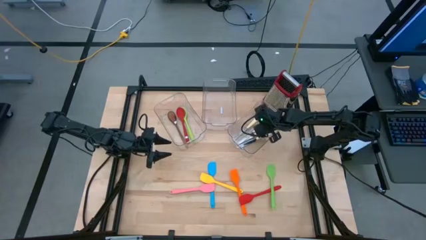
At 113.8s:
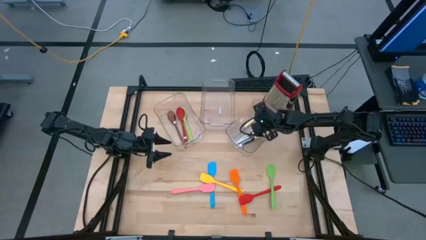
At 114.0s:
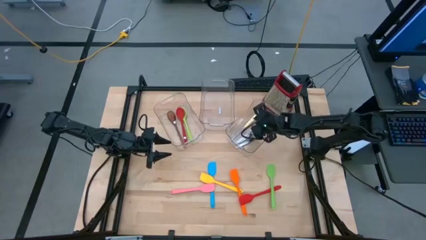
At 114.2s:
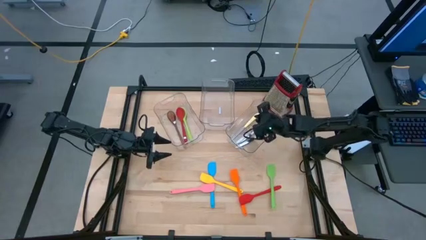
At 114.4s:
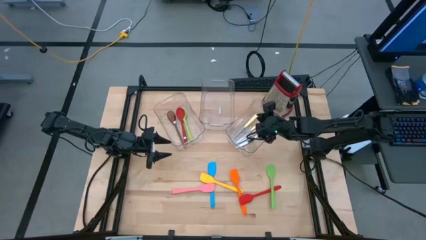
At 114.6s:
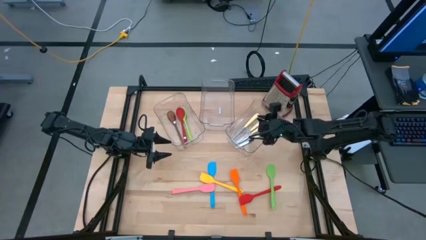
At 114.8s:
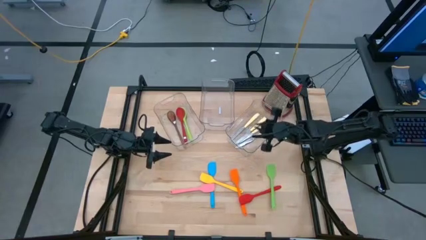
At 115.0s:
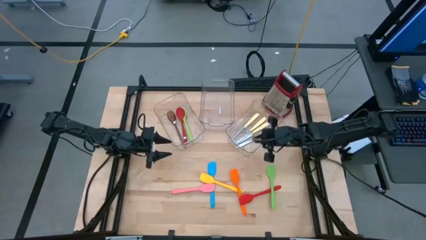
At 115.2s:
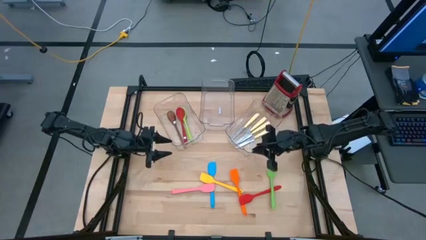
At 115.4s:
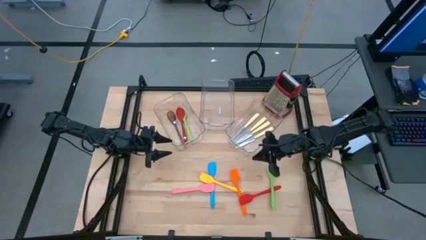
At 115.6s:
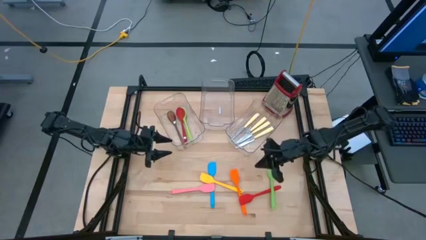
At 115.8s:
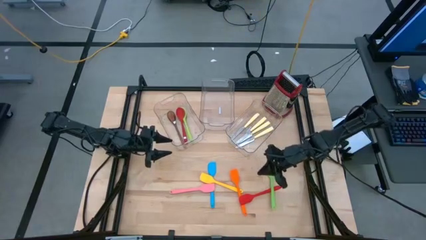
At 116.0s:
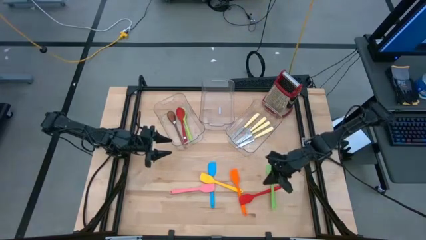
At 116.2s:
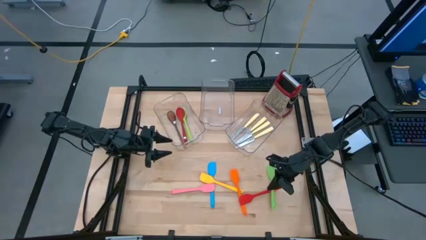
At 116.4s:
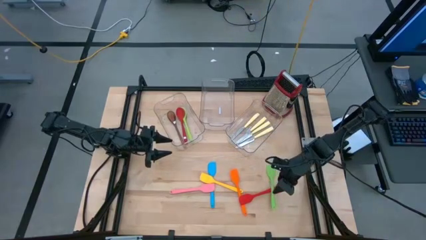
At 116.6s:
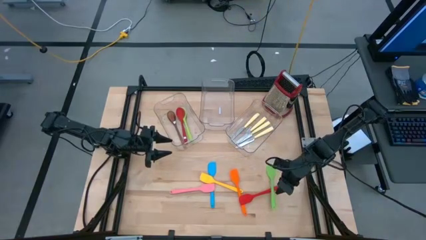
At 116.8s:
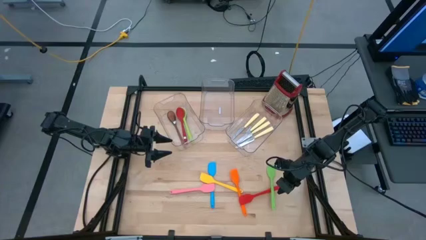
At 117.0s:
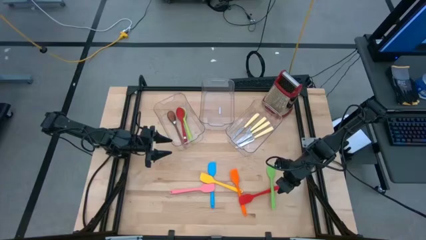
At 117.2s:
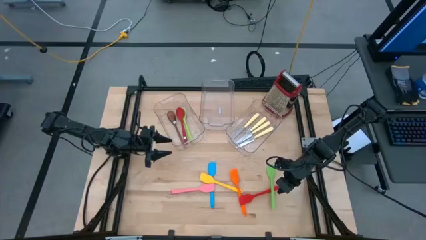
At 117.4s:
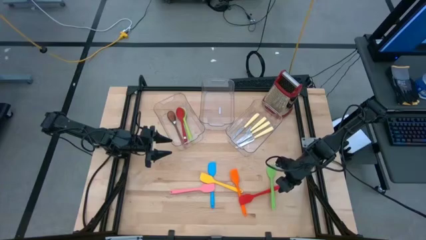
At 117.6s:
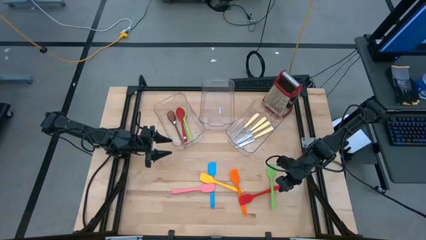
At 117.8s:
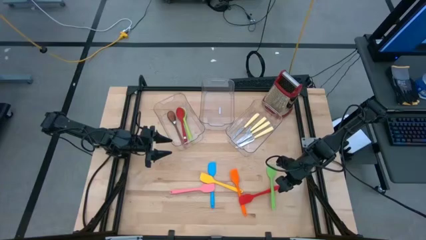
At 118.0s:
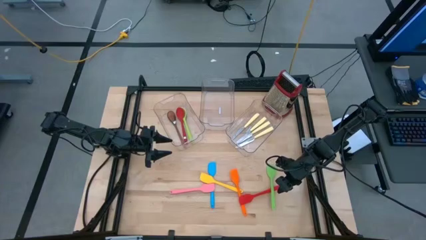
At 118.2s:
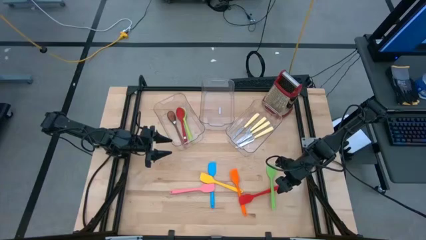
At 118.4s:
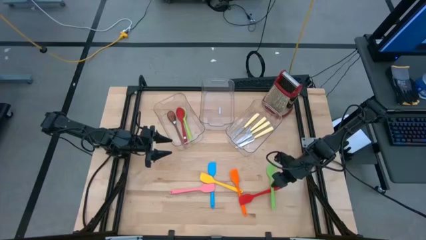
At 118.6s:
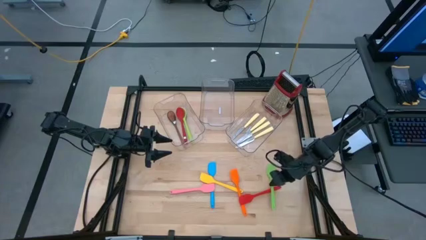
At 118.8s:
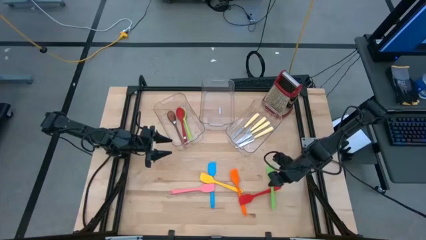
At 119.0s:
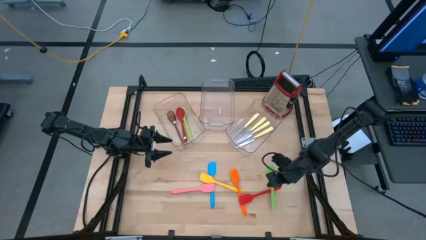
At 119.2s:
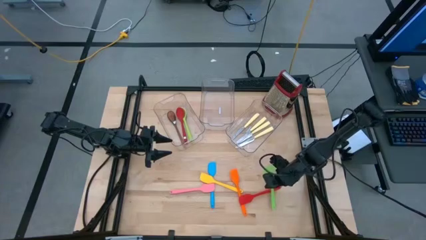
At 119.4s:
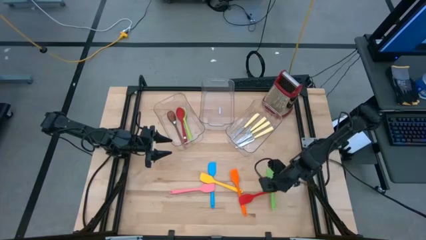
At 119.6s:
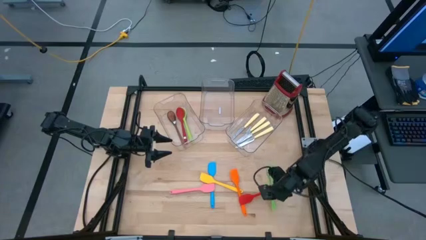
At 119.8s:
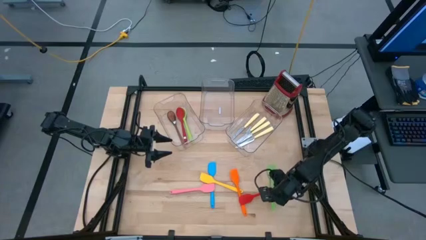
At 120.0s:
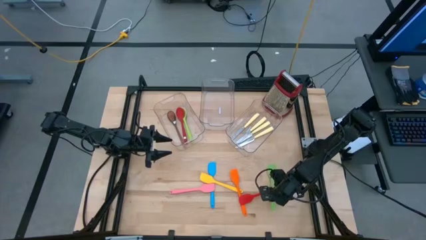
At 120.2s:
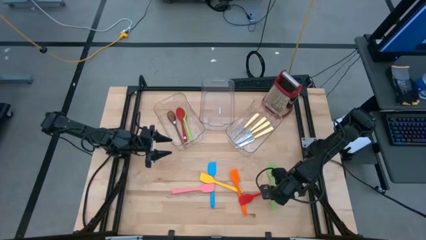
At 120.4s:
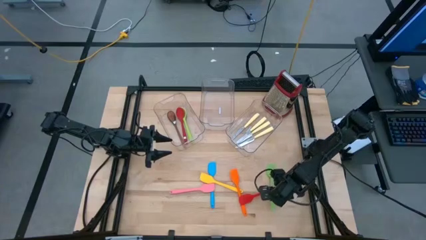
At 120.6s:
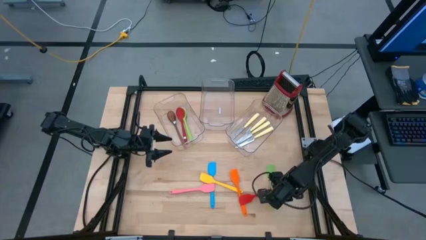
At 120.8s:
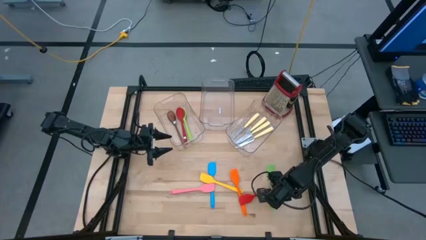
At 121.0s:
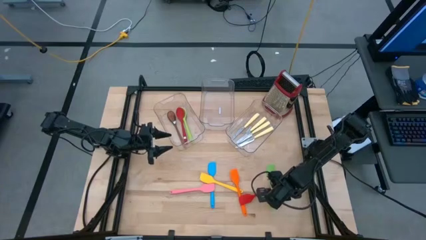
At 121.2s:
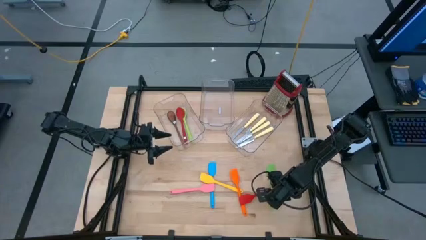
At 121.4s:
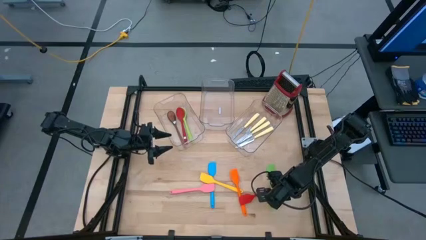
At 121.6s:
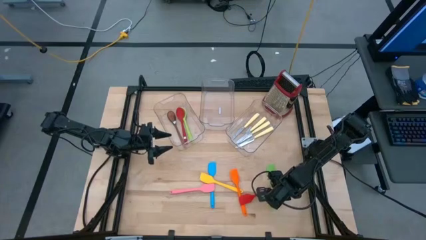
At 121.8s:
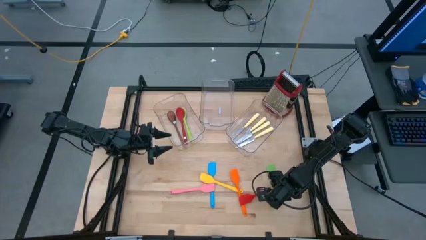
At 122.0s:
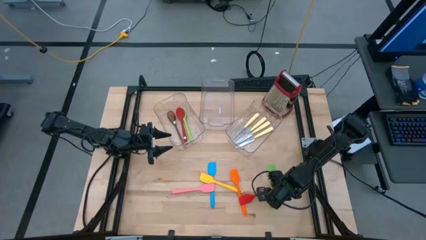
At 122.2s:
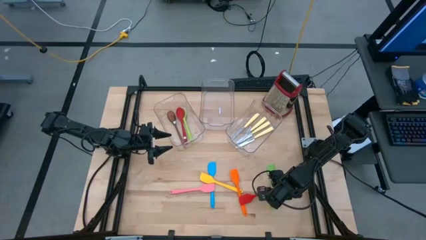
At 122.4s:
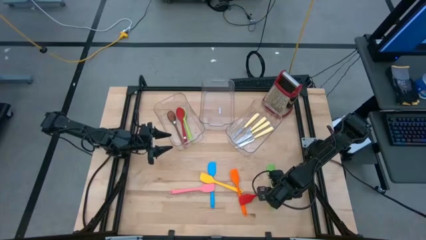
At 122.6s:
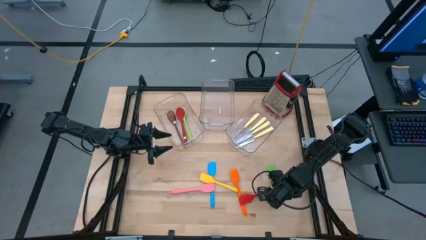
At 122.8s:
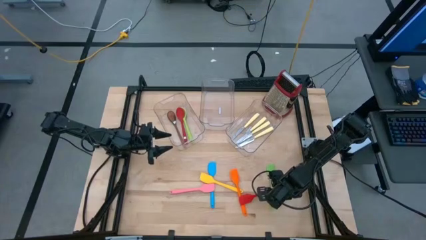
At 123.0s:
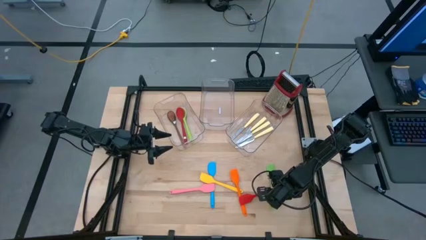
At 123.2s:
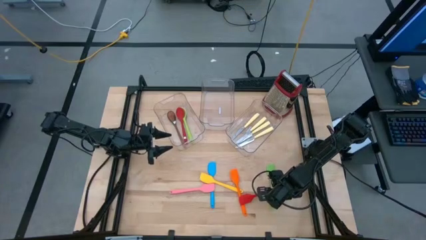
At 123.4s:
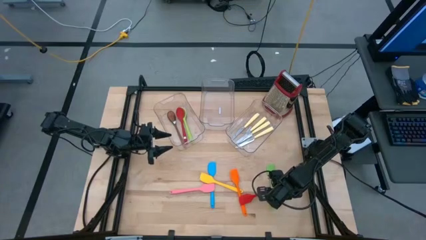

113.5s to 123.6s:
Task: Pick & Place Kitchen Items
Put the green spatula into the middle transparent bin

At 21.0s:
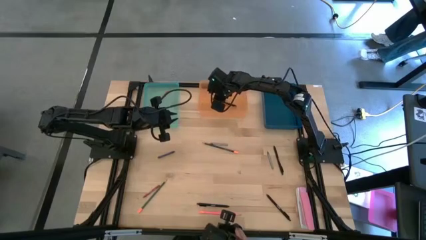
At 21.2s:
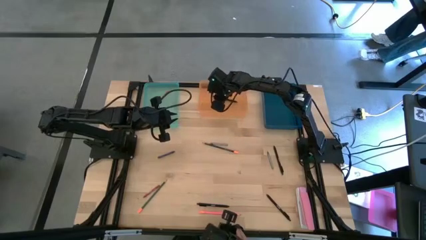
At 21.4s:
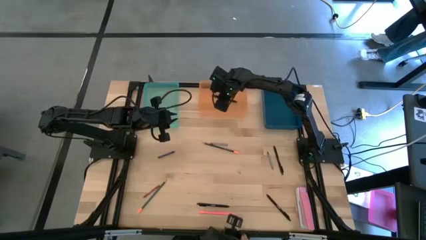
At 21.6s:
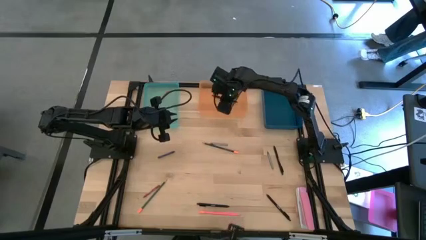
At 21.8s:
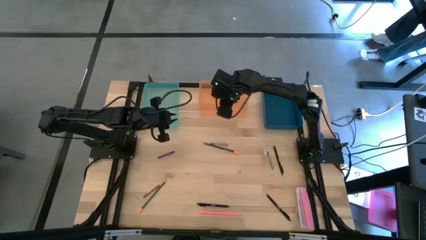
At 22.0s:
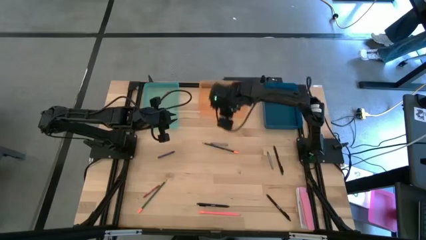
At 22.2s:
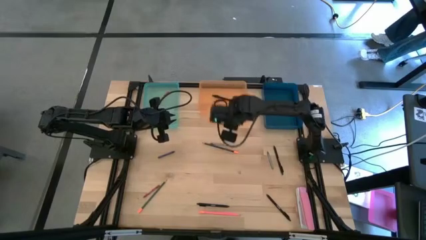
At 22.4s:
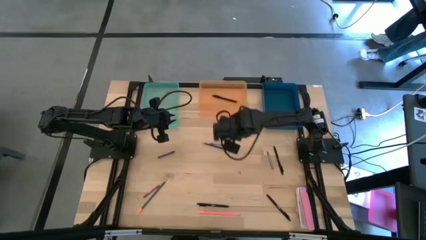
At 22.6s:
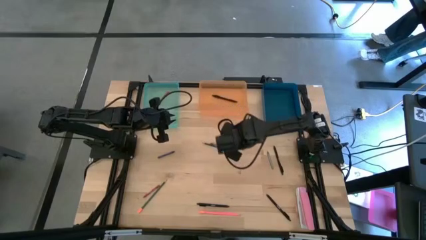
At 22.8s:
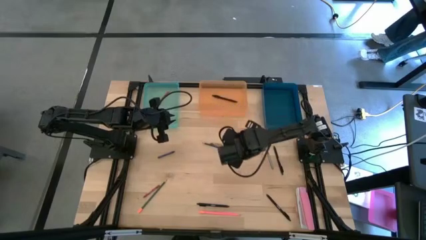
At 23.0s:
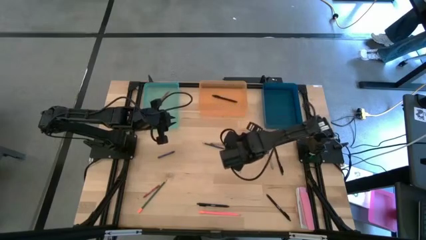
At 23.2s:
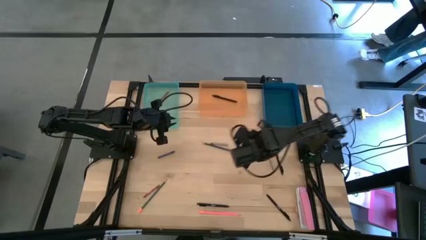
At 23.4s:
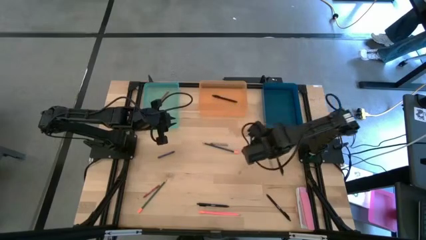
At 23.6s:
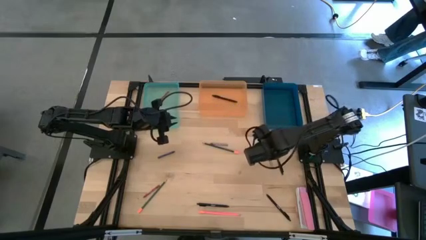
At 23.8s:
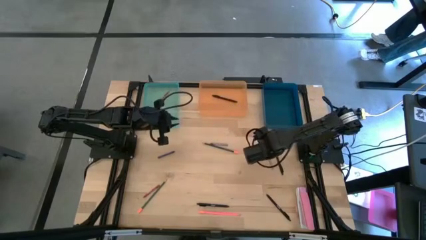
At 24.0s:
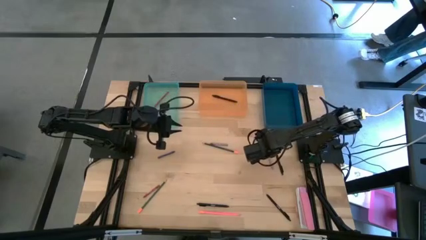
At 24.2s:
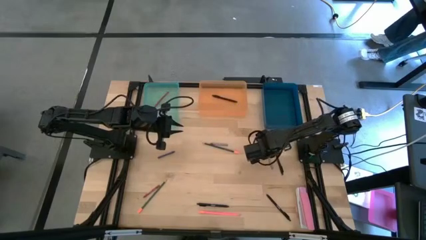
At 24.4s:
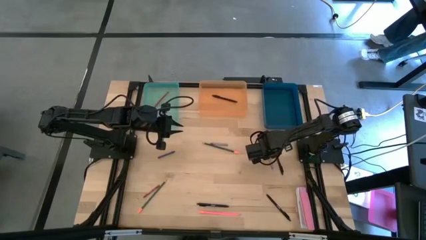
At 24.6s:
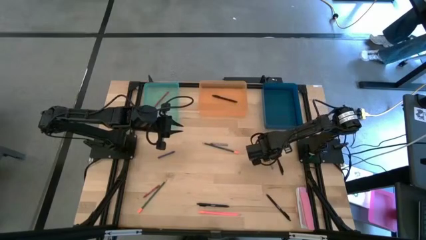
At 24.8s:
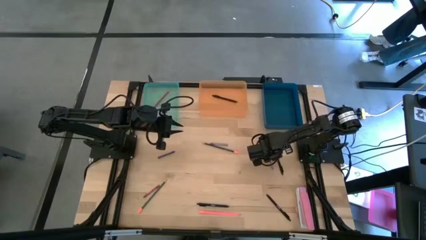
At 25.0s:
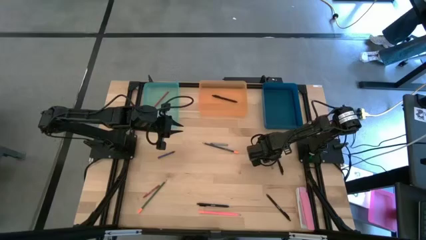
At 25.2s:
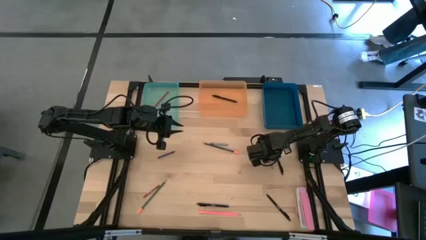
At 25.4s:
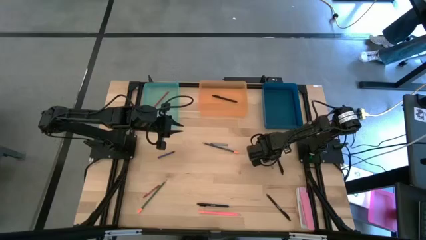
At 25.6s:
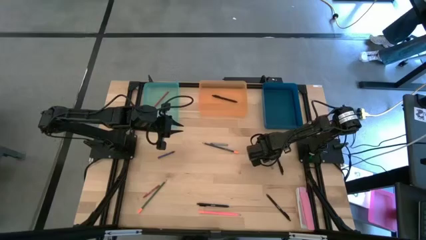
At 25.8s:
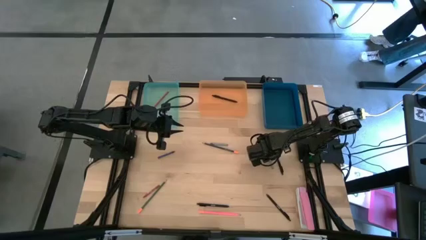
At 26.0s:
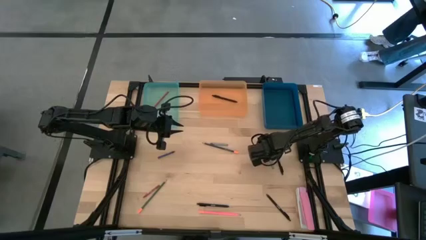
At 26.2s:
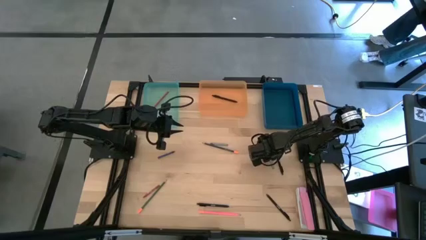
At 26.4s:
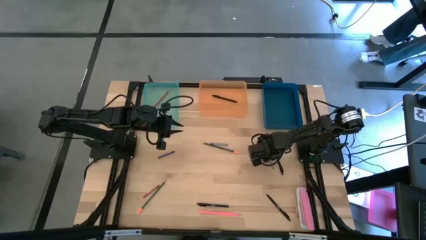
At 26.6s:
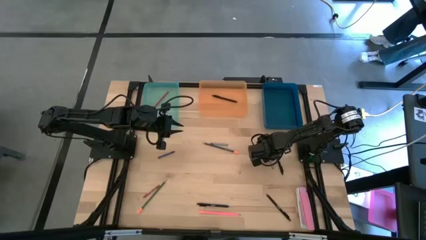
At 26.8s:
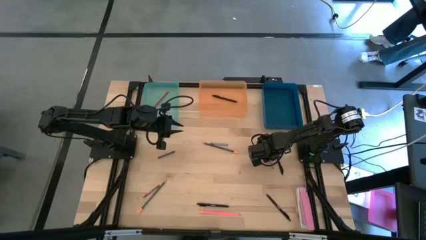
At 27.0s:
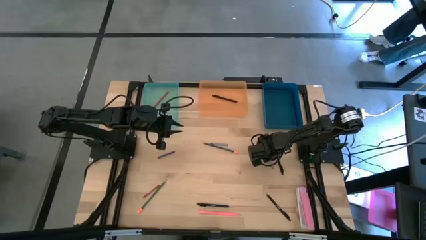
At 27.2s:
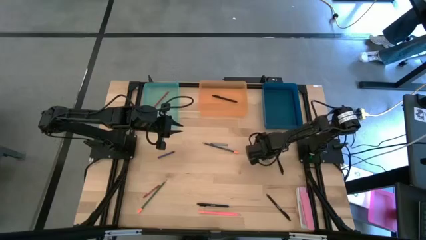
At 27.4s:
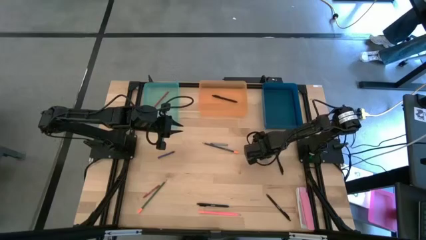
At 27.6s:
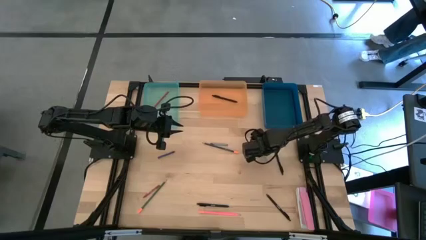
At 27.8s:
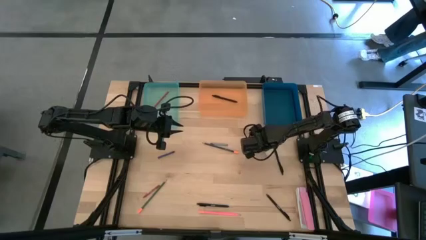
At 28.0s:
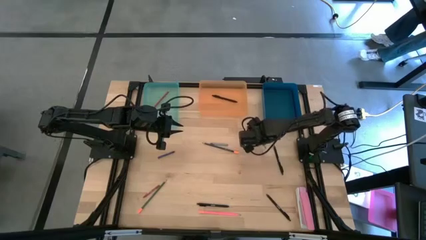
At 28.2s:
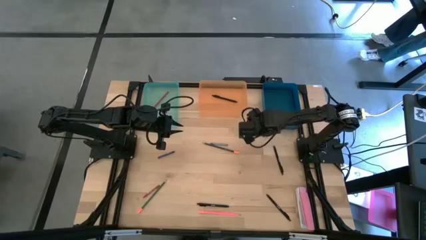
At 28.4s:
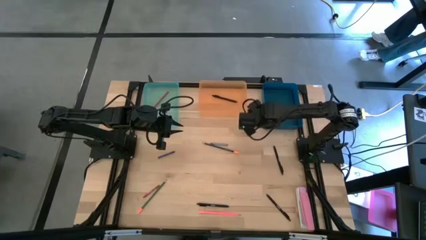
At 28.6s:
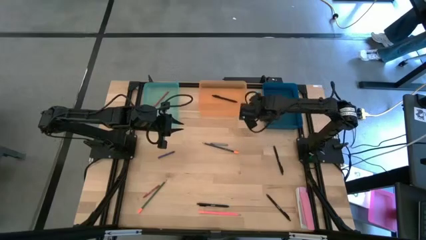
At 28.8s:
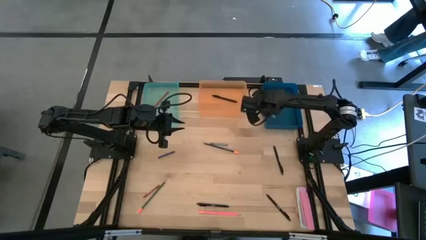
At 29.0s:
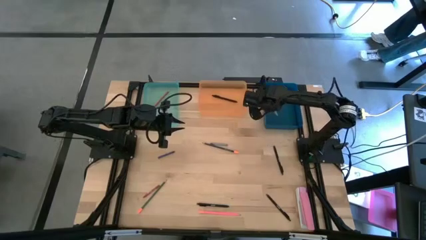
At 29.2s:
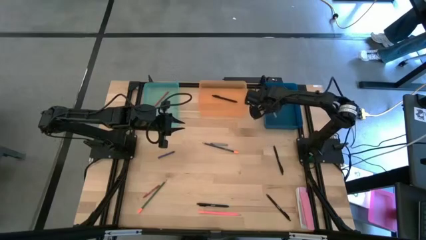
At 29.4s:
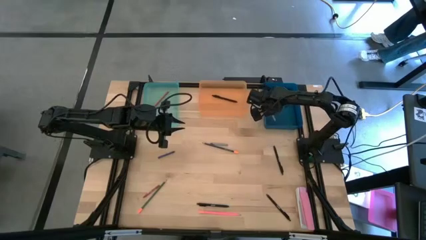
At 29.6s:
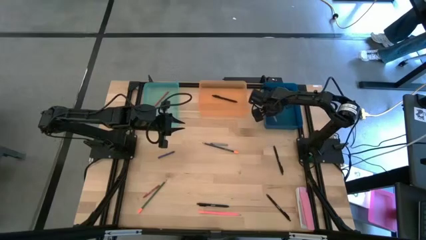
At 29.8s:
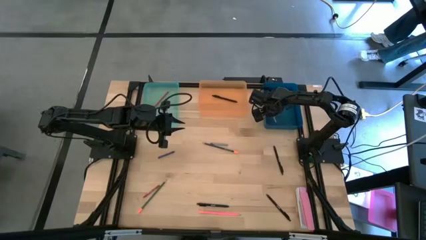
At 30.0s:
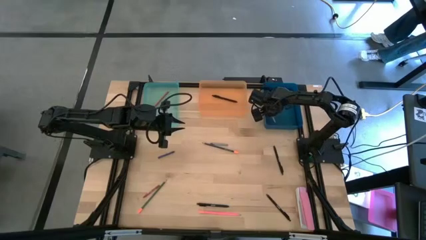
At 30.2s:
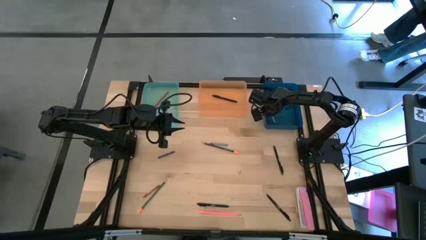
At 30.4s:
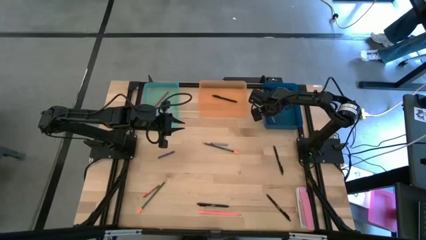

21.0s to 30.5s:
Task: Sort crayons/erasers/pens/pencils in bins
Put the gray crayon into the blue bin
